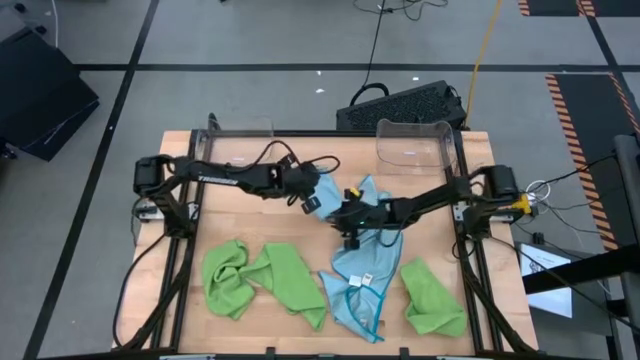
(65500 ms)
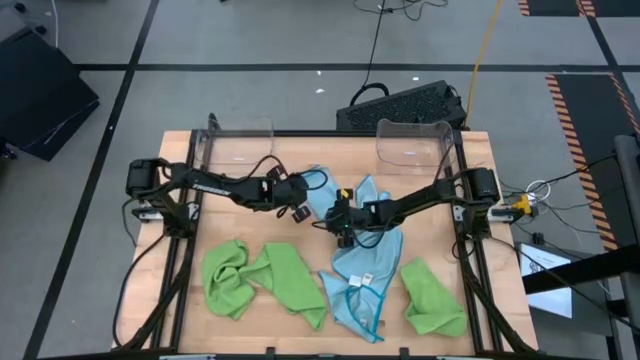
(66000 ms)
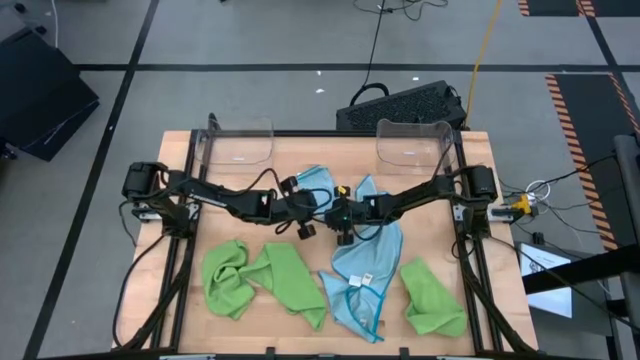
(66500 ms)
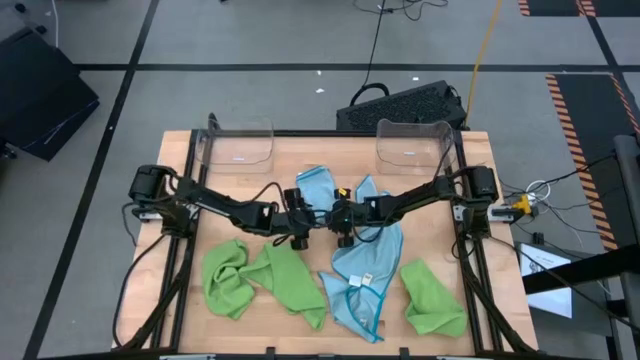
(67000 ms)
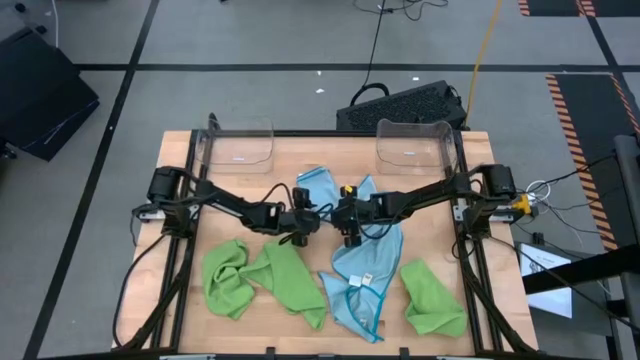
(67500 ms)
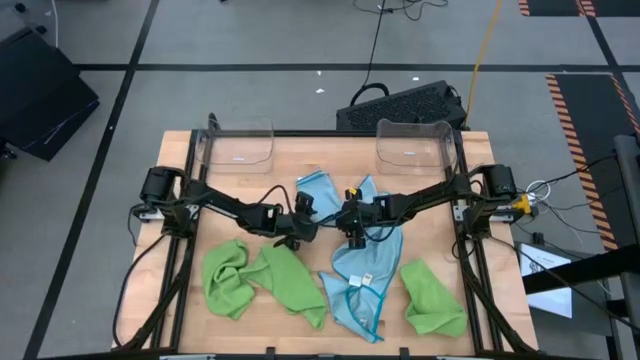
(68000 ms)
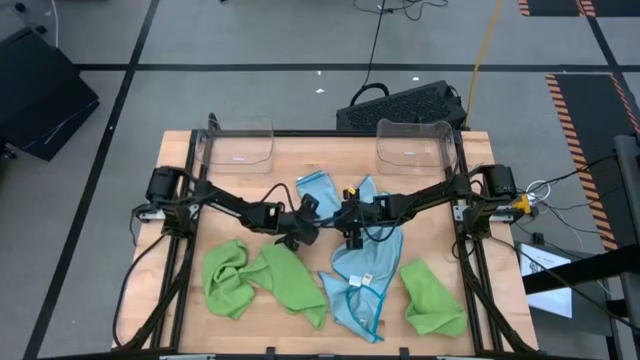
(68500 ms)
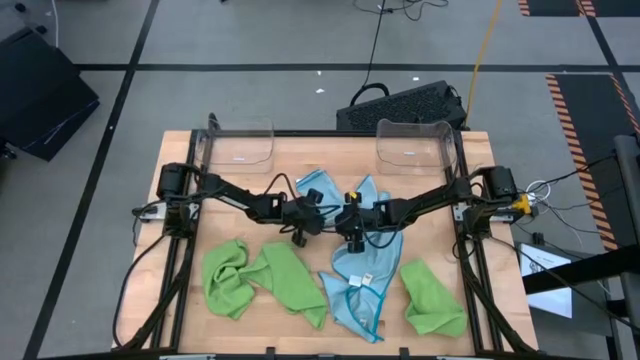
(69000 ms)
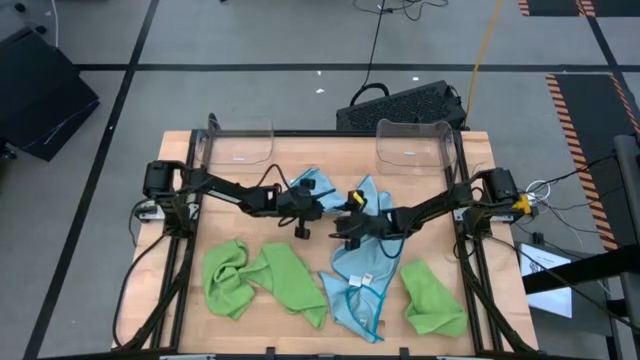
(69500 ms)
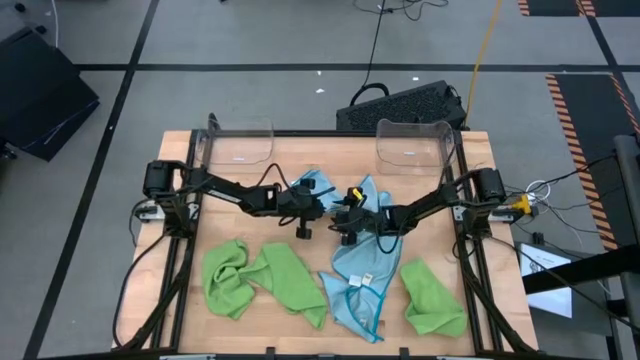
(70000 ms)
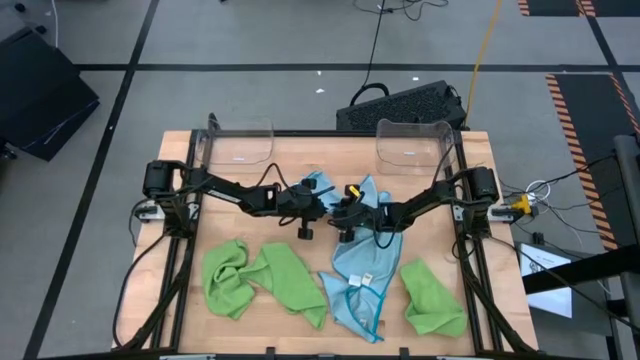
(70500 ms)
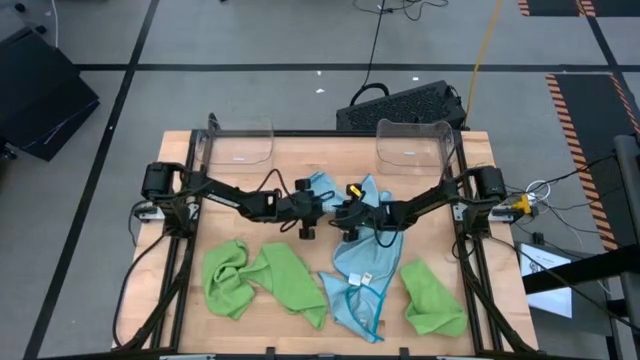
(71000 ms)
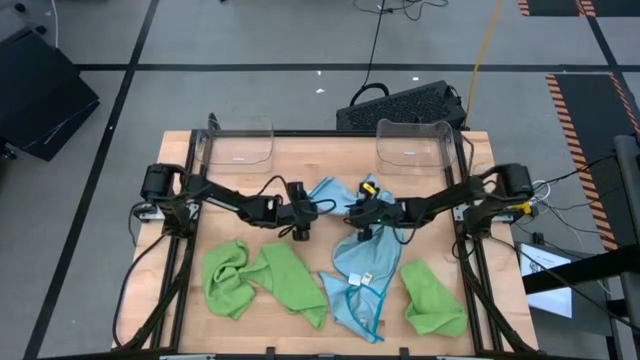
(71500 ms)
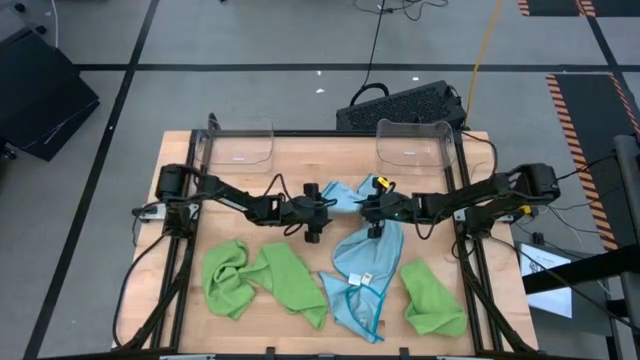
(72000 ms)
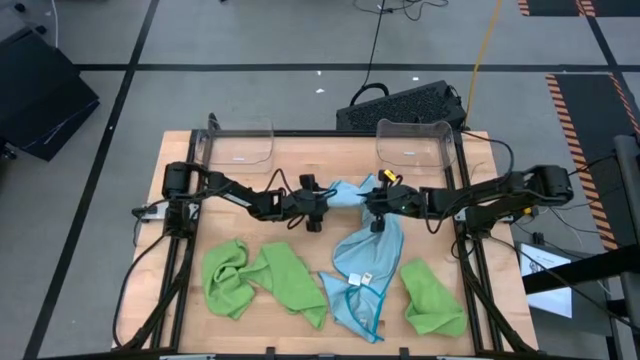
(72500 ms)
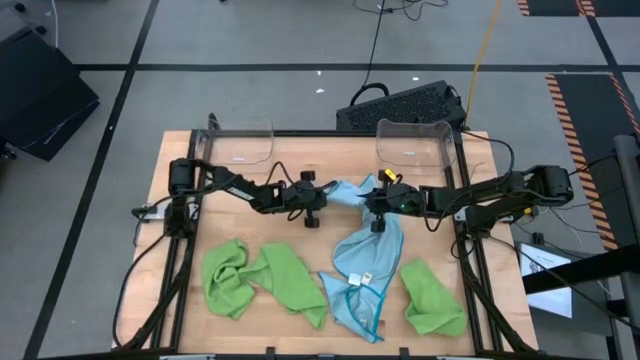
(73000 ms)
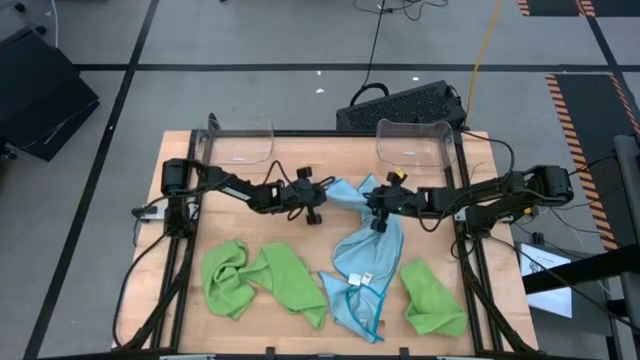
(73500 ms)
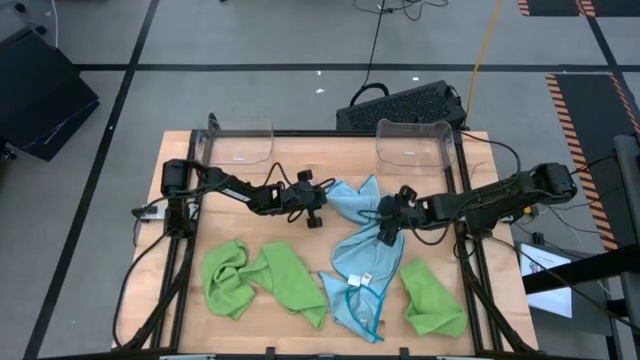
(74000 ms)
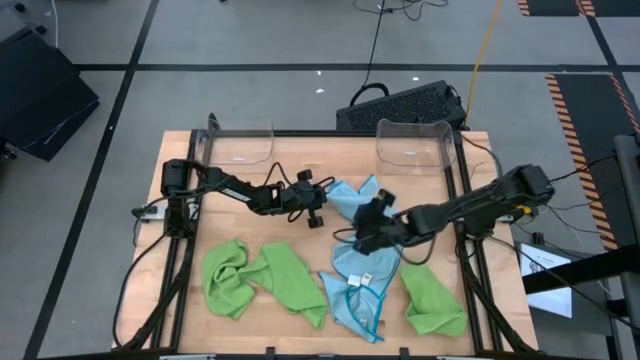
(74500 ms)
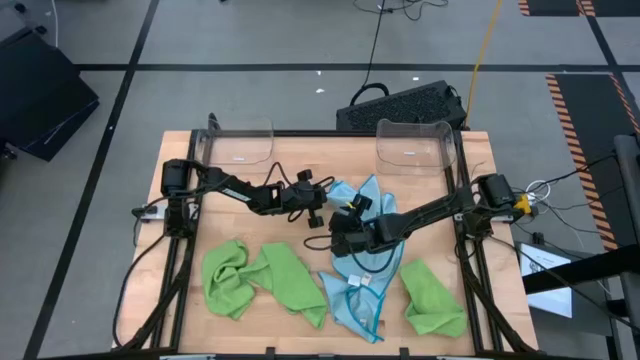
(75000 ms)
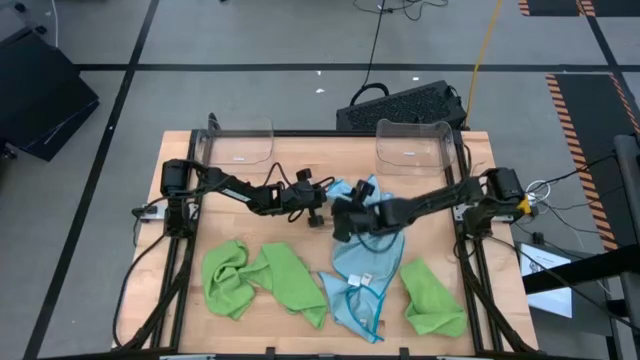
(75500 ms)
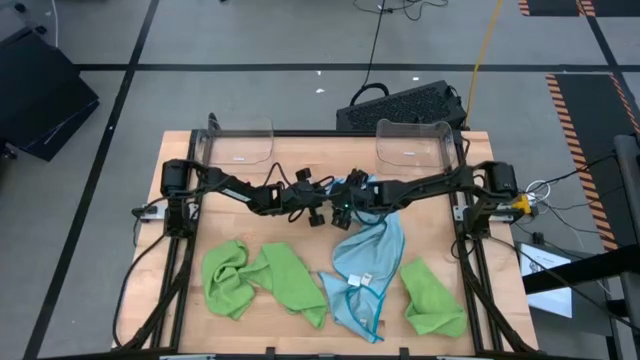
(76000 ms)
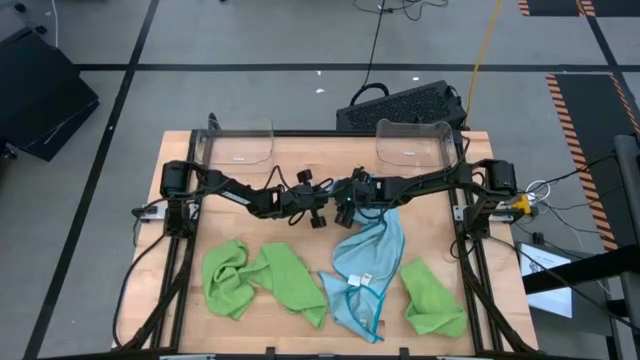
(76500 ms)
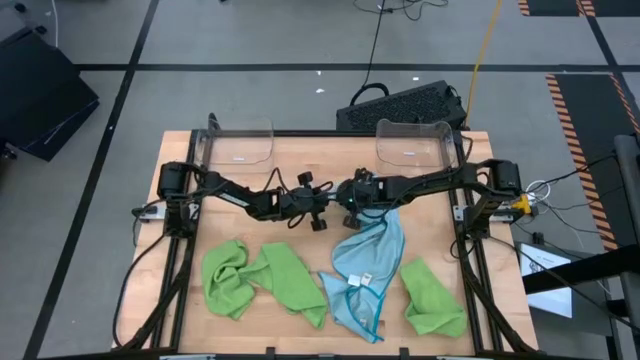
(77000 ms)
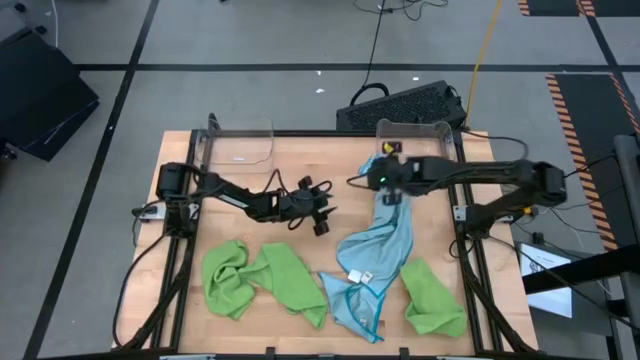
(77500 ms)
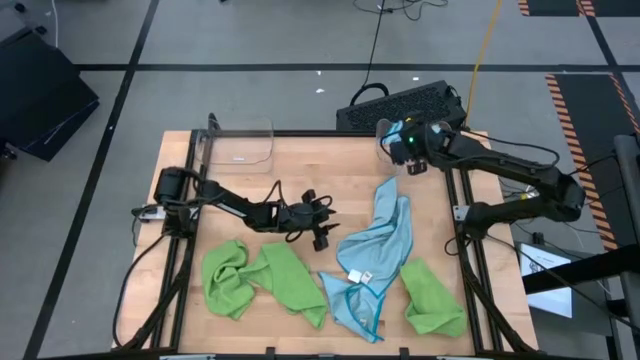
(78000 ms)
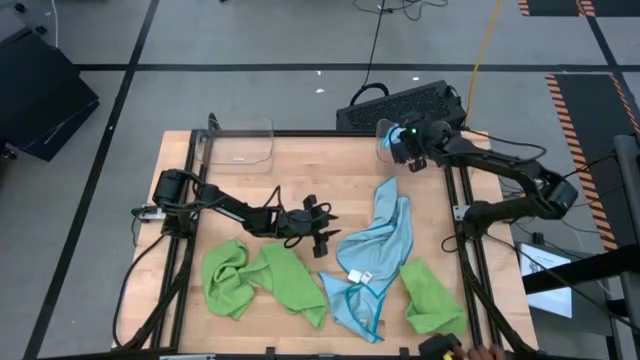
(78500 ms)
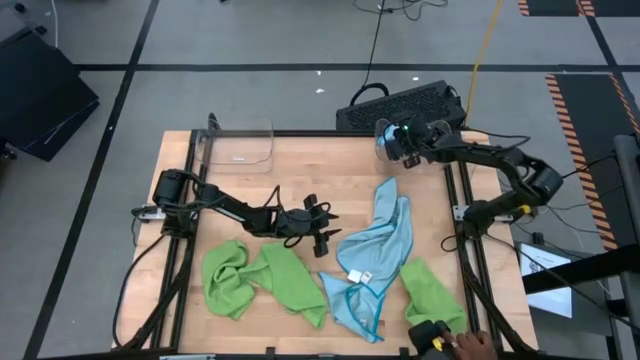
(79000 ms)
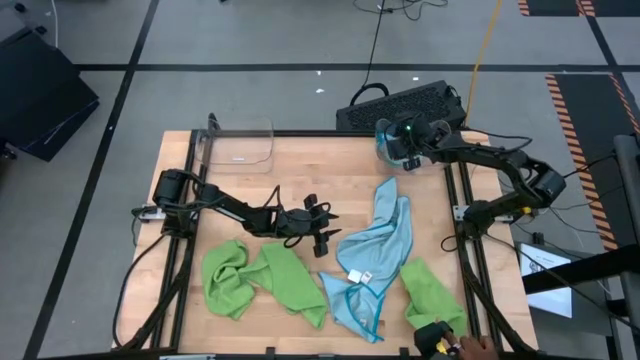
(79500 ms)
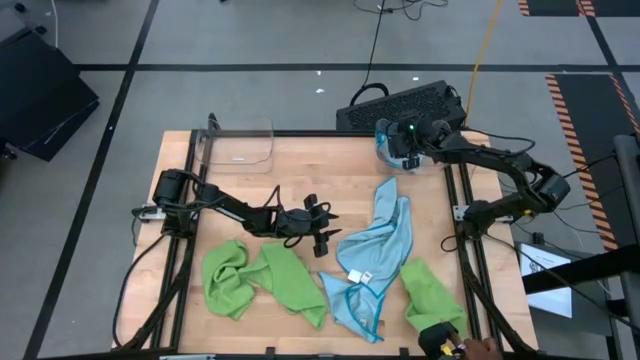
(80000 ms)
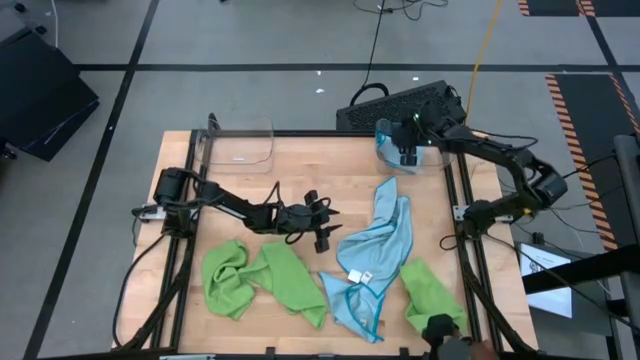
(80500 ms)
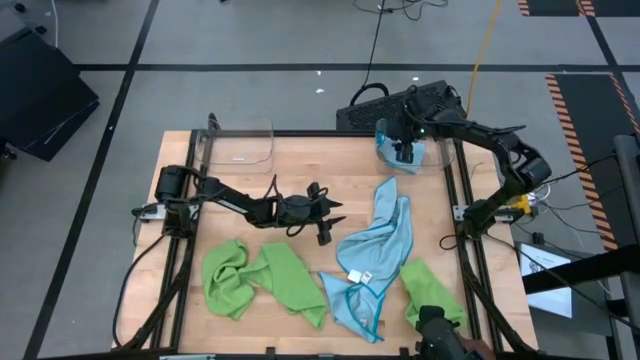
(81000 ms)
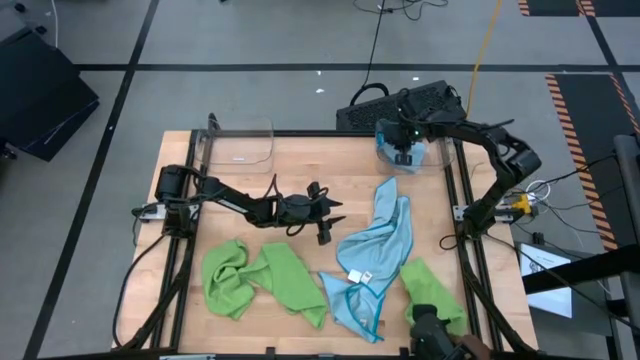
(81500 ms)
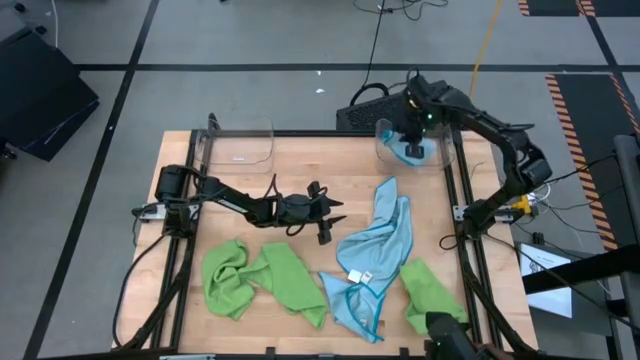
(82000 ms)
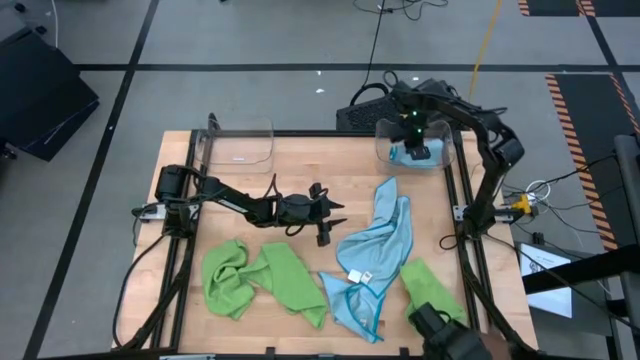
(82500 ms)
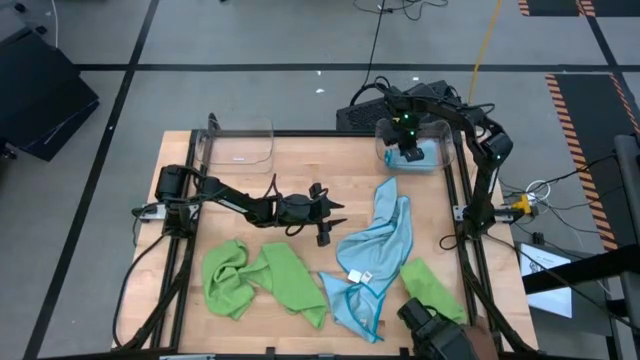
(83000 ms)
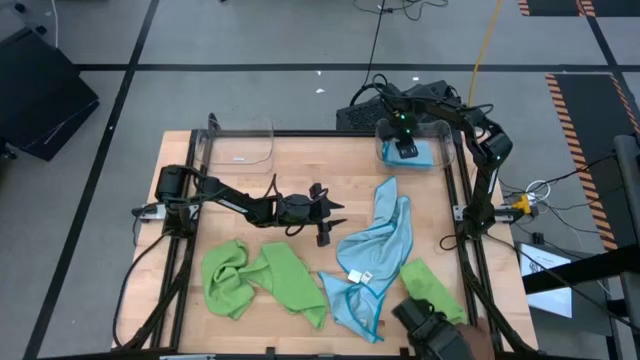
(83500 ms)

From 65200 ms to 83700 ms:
Task: Fold microfiber towels
Put the folded blue microfiber cloth into the right transparent bin

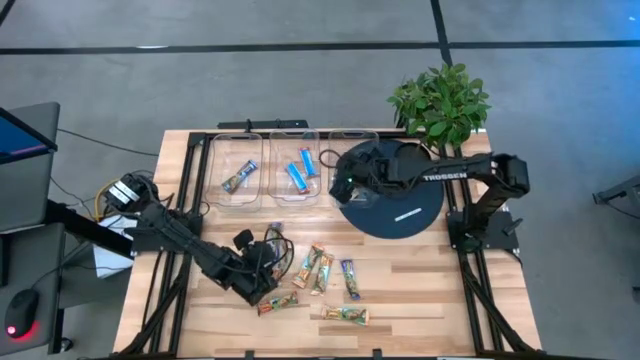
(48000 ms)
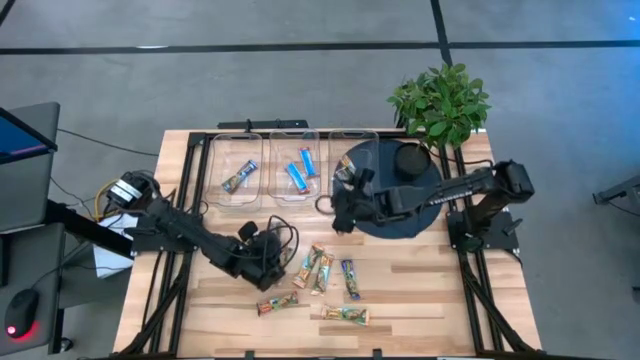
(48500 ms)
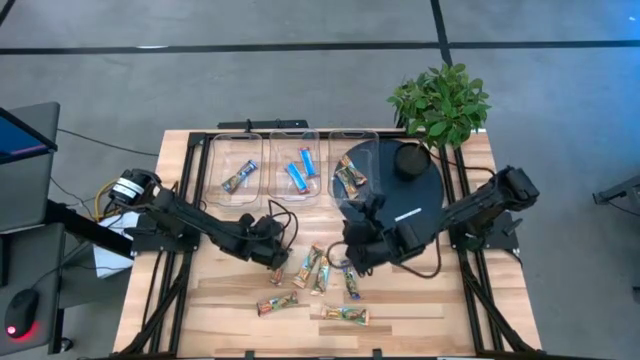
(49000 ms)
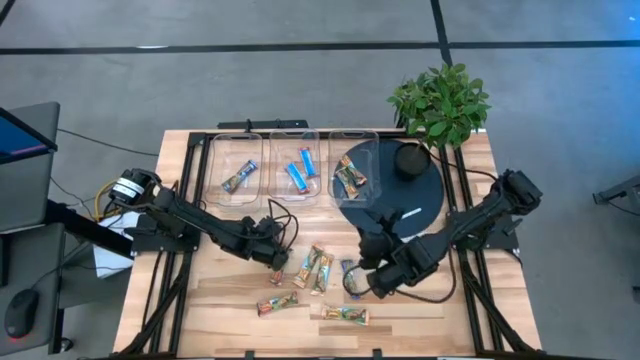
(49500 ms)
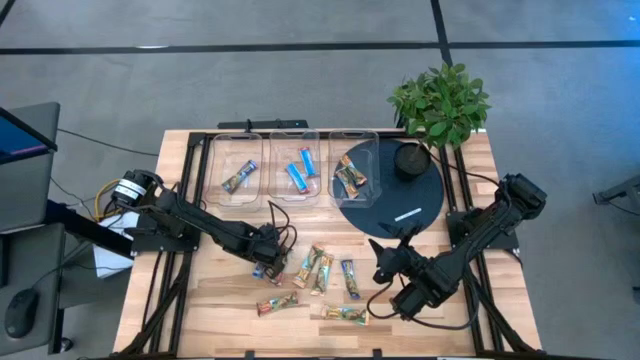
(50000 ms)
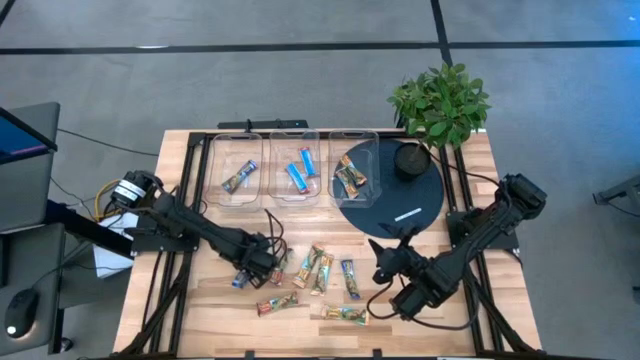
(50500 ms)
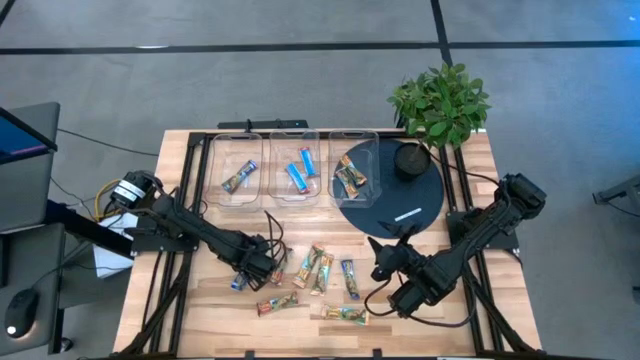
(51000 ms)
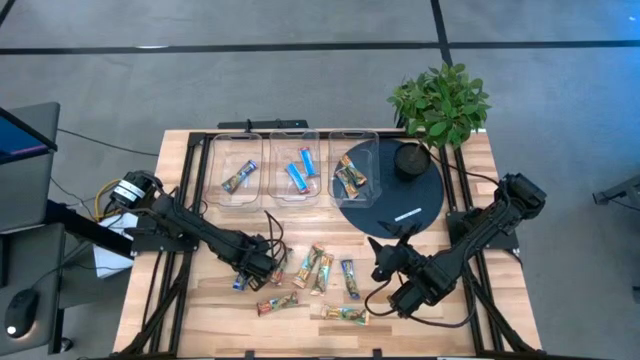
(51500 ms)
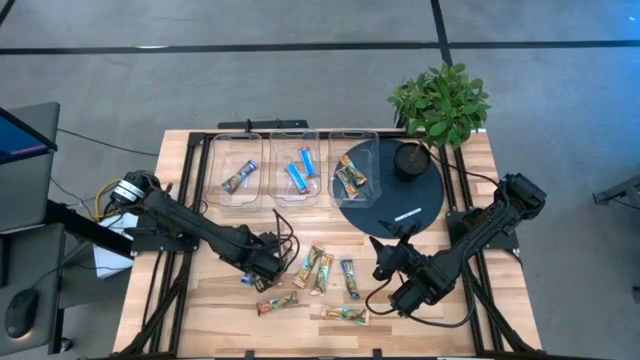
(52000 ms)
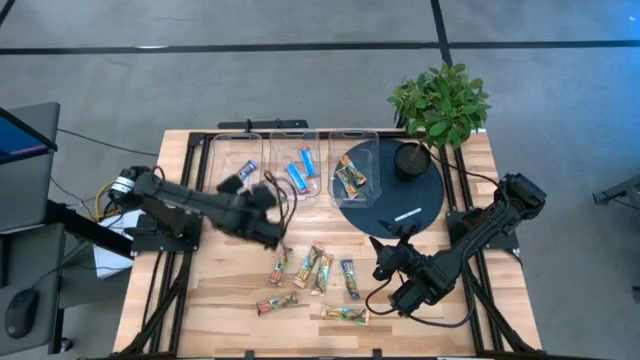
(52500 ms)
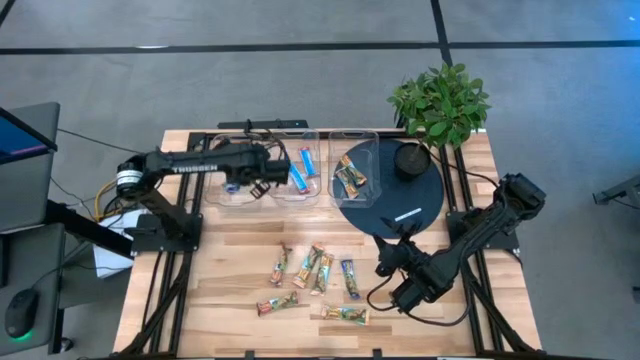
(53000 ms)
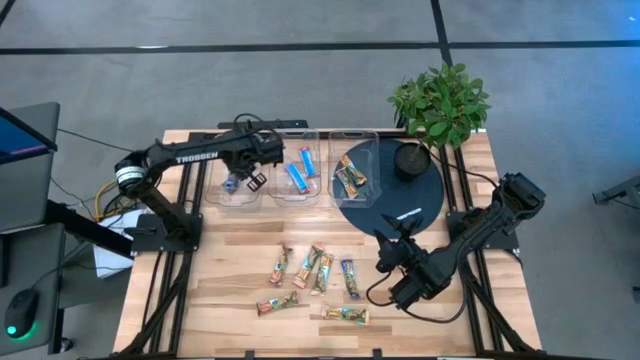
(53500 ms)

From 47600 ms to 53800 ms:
Task: Pick and place Granola Bars by type
Put the left blue chocolate chip into the left transparent bin
